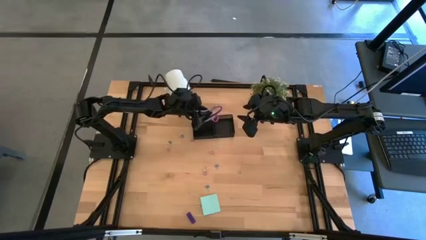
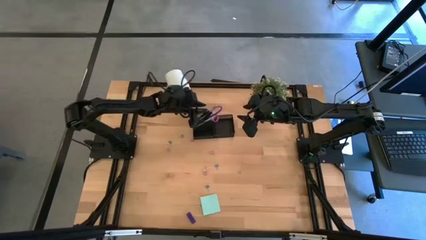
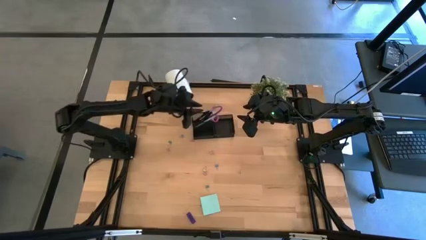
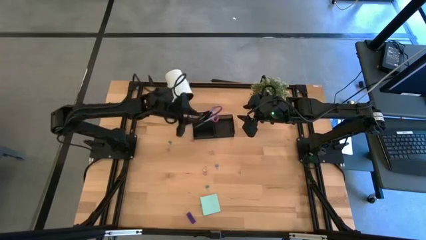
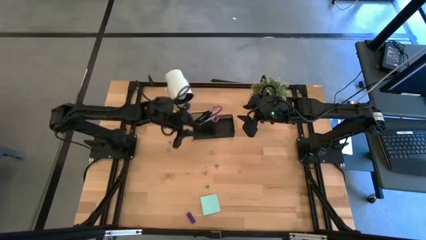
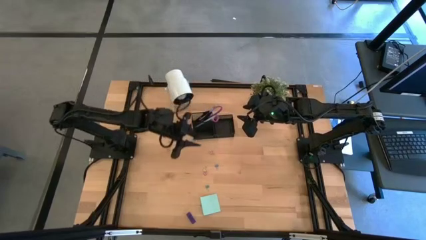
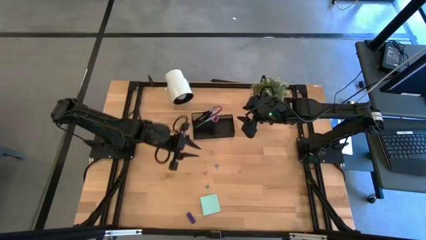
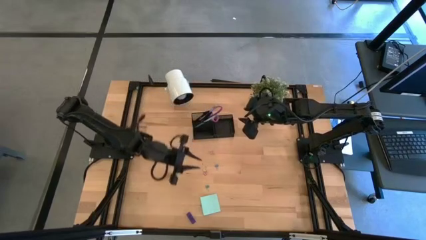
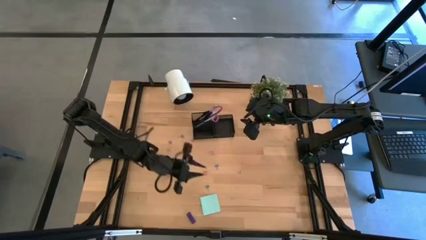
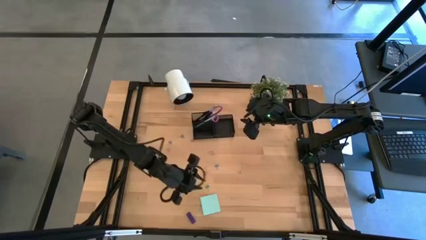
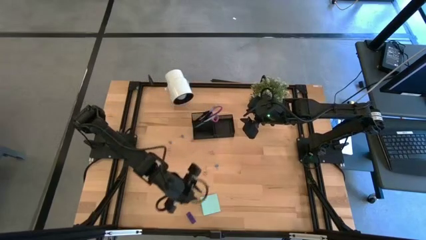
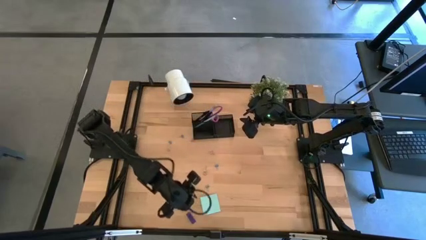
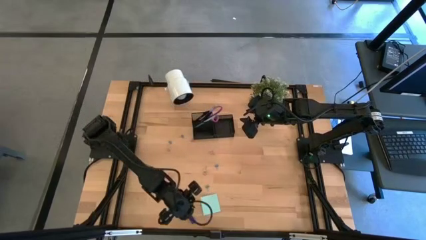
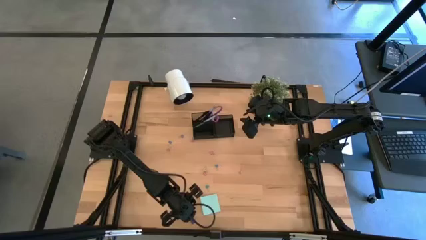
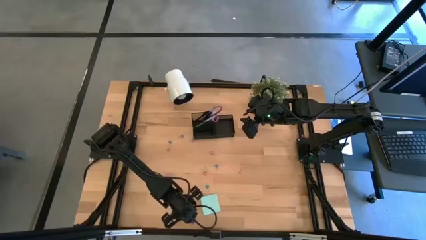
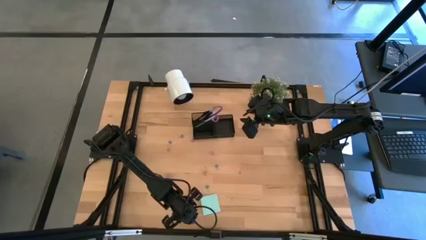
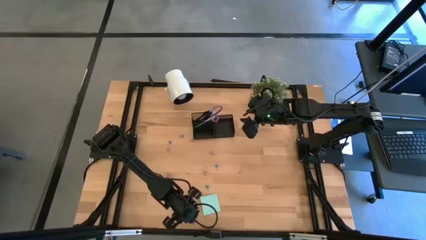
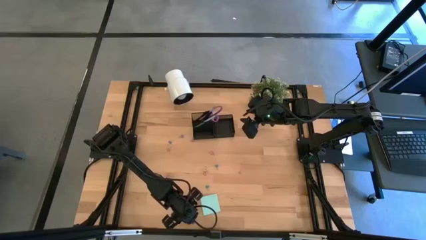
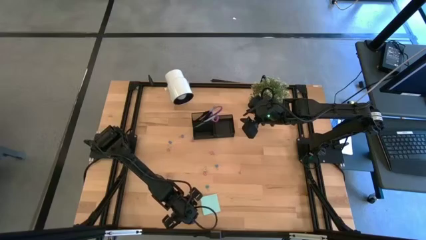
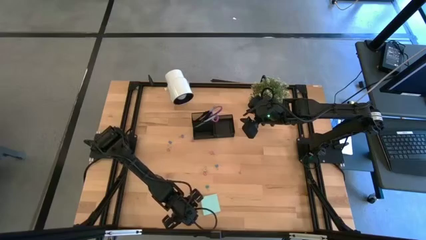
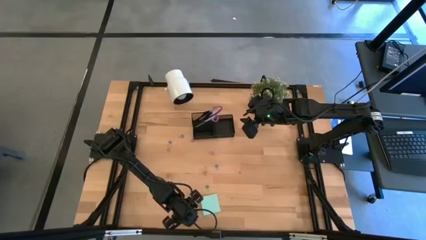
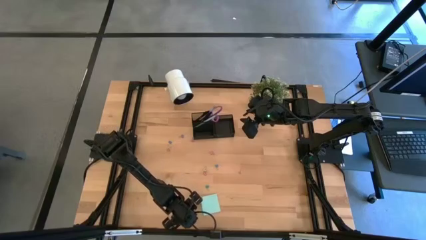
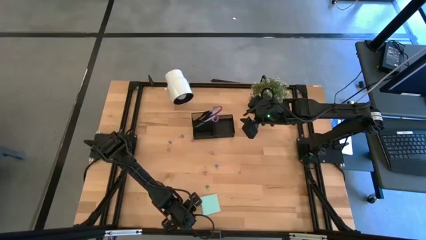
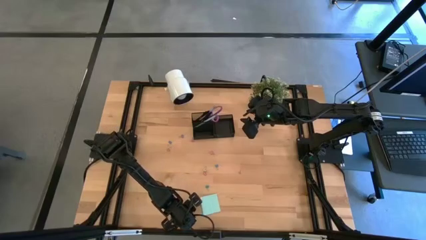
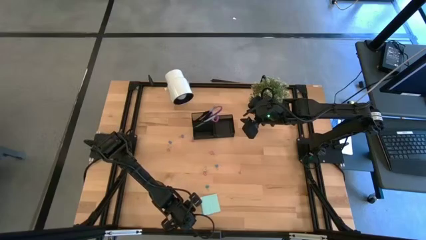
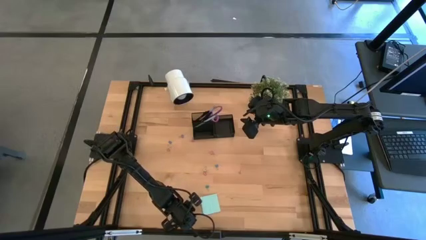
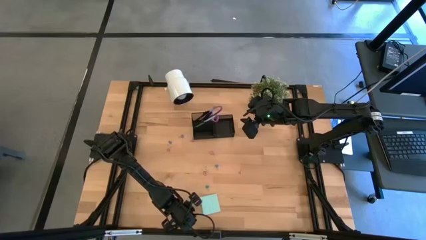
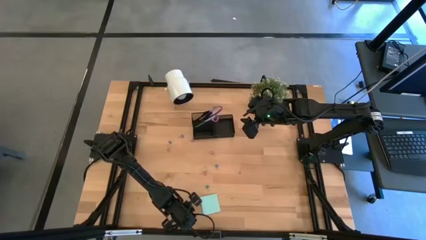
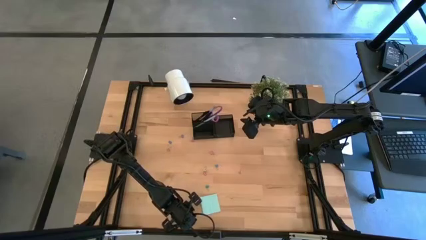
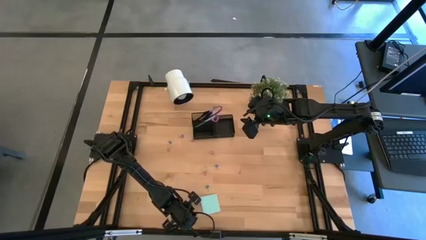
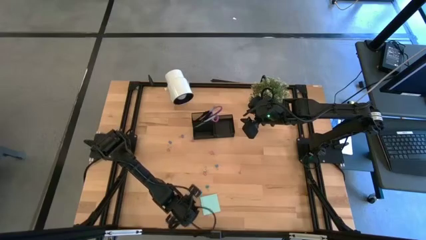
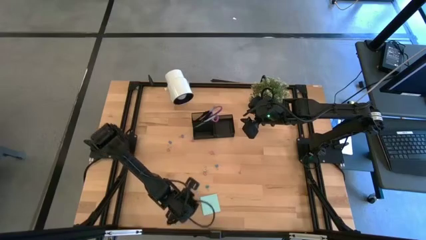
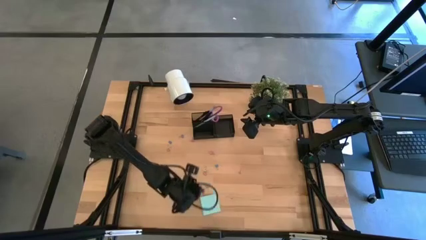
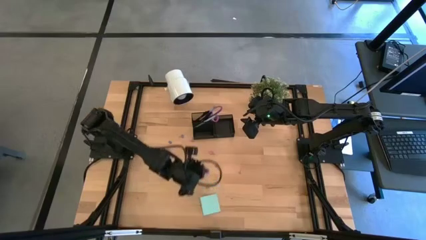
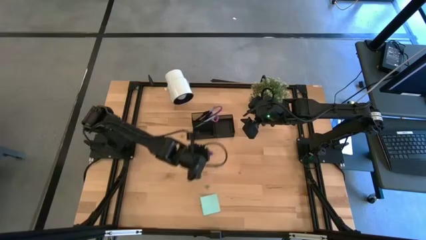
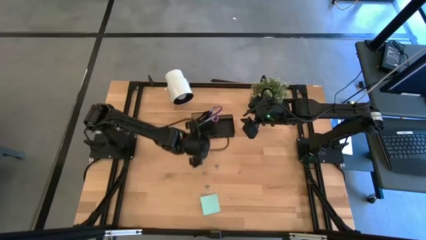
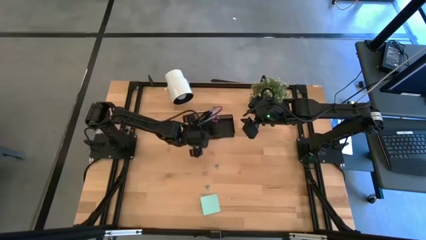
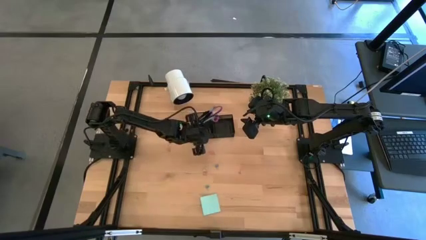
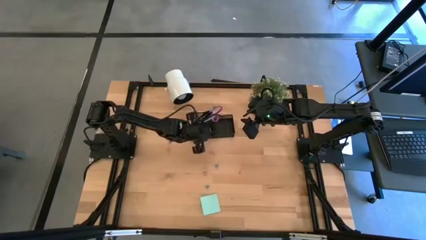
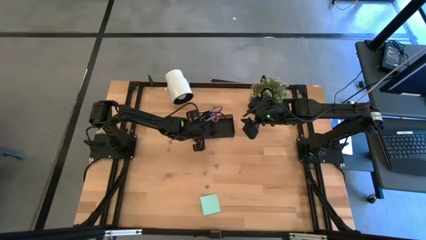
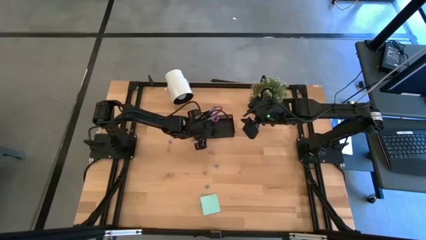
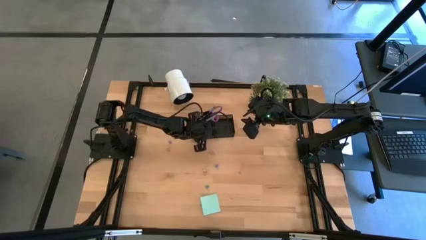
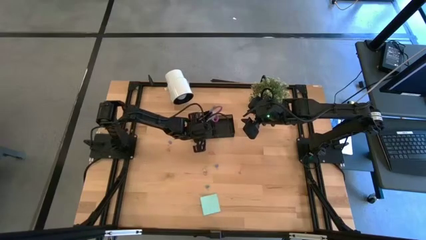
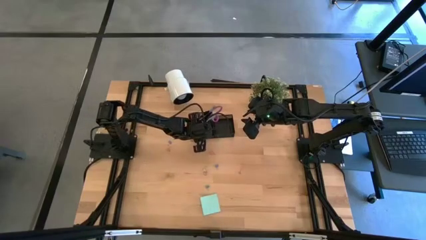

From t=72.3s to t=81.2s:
Task: Pick and place office supplies into organizer
Put the blue eraser into the black desk organizer

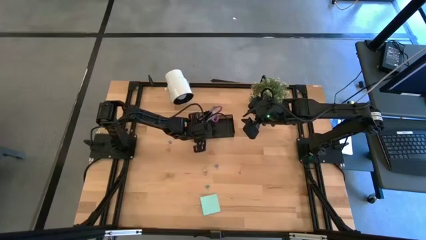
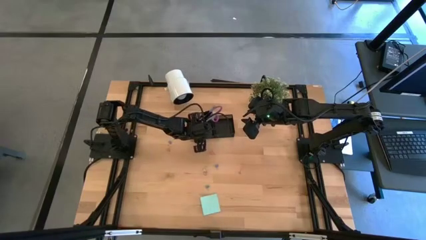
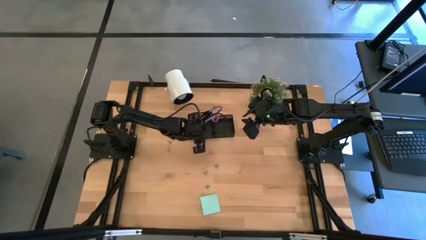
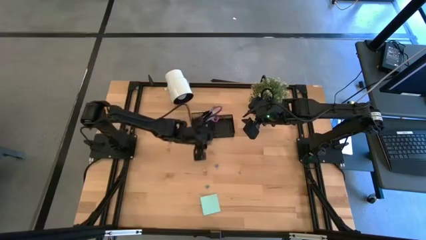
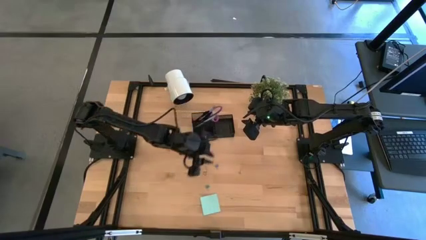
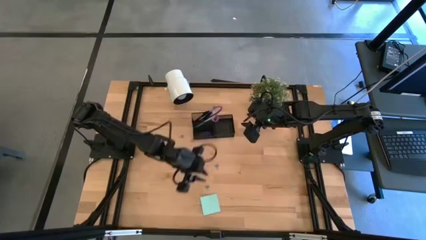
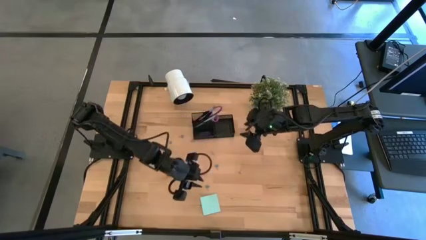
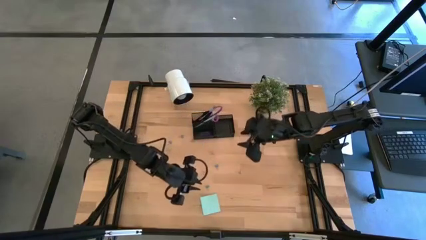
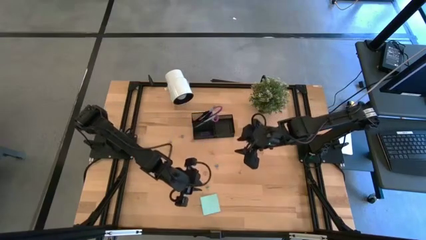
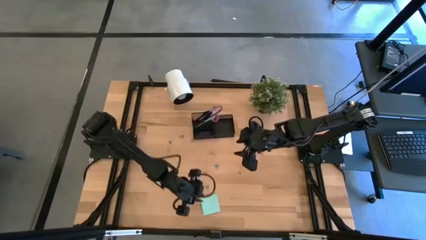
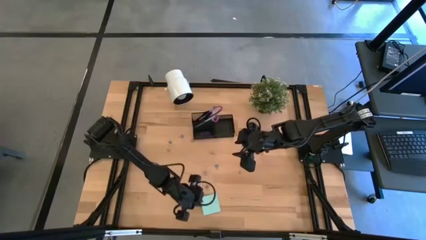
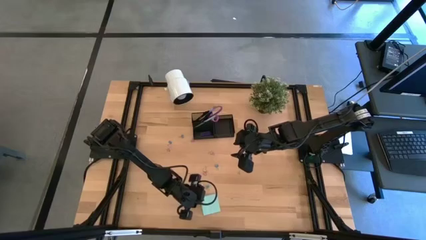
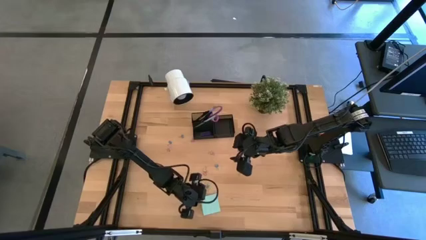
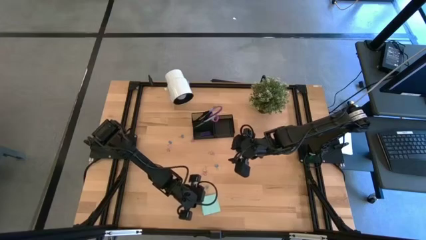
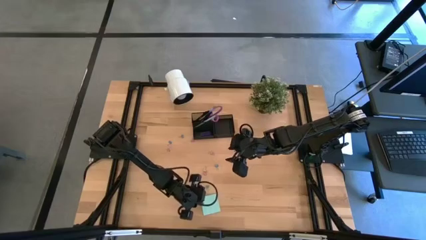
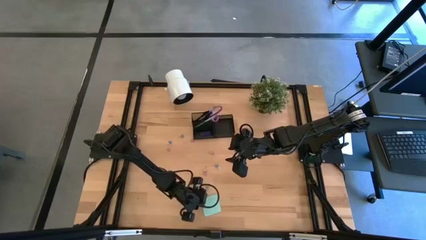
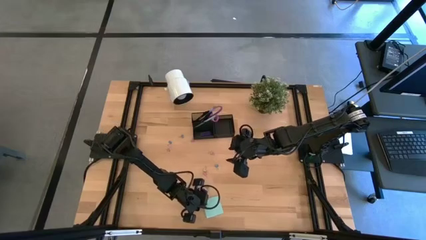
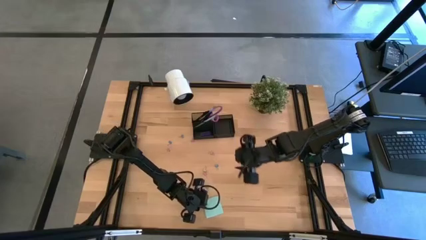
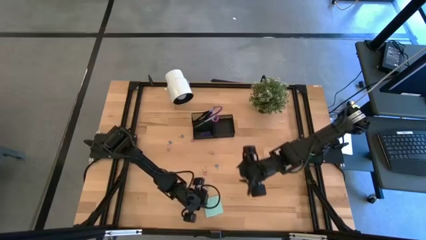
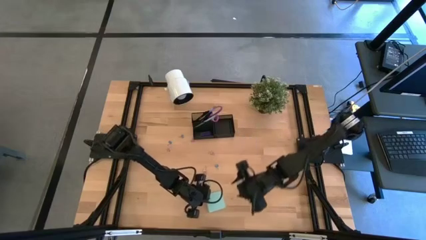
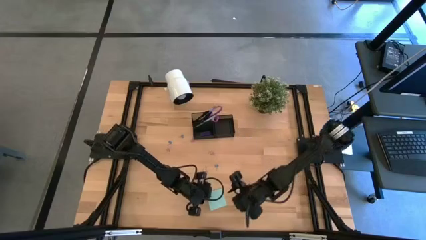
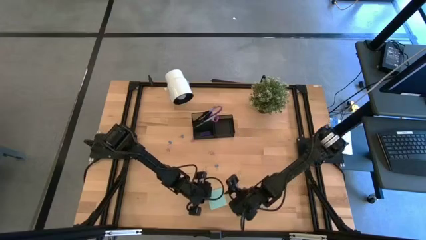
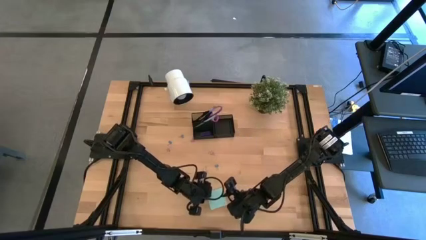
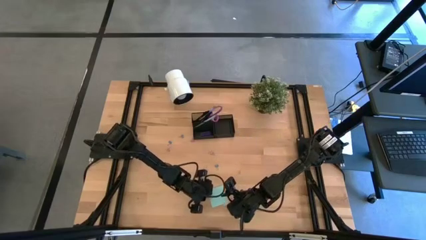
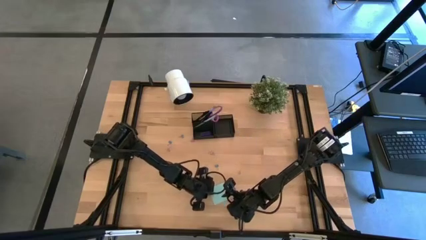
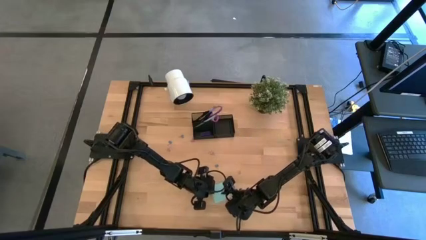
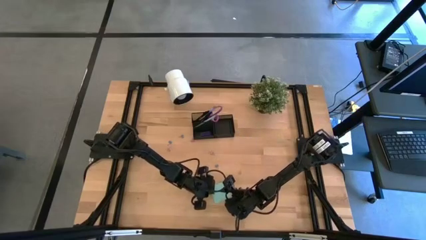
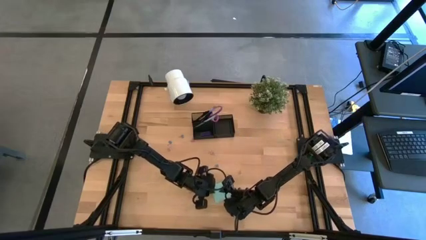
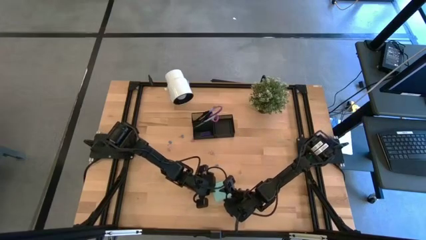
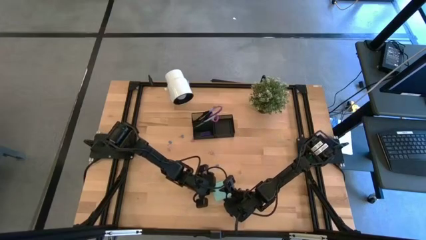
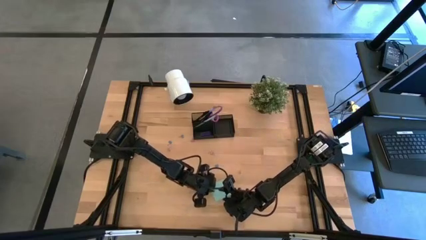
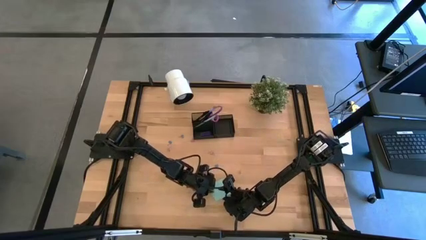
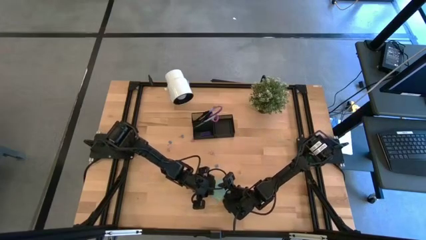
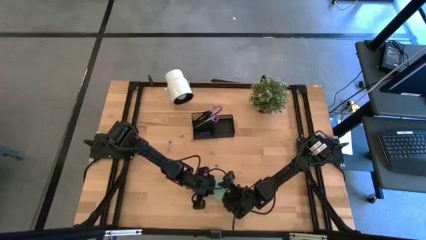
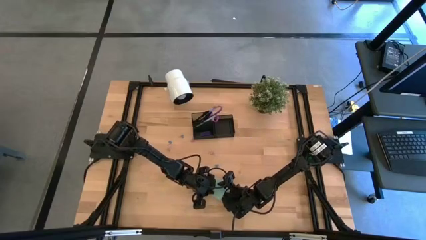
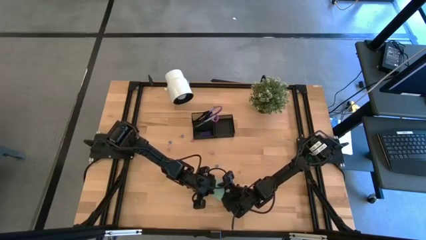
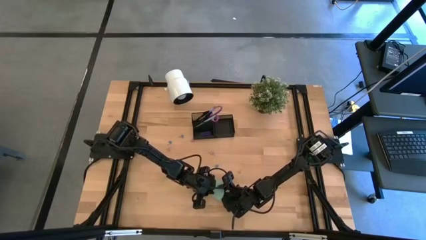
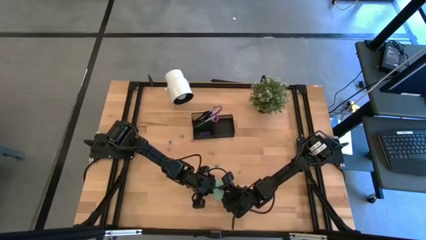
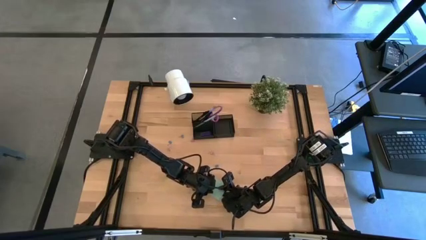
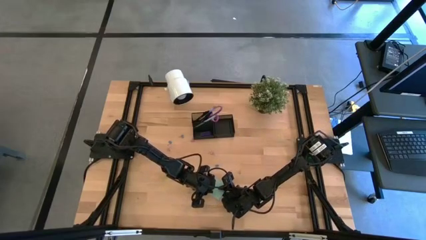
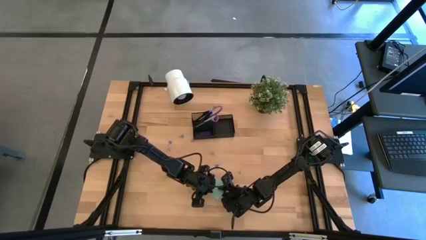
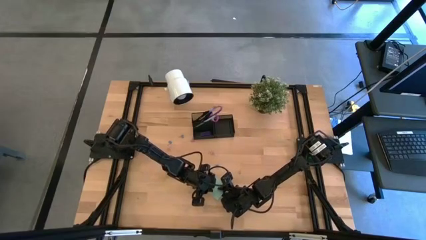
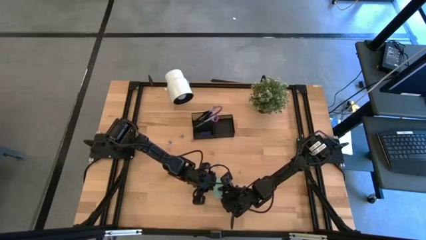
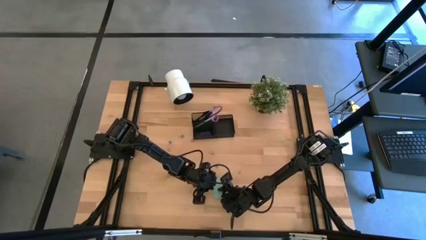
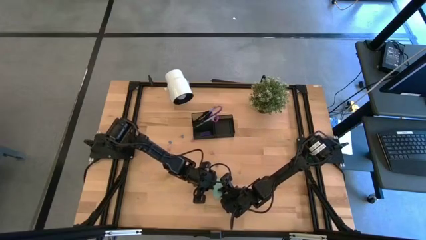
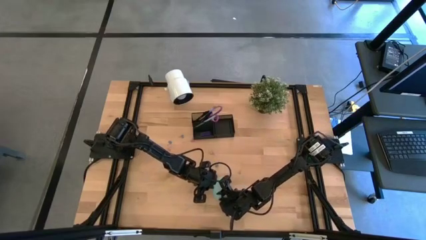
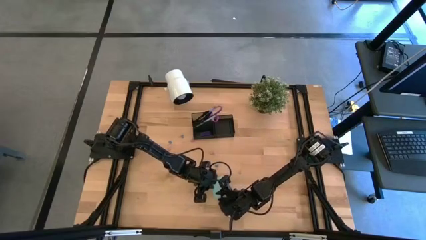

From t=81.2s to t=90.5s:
Put the sticky note pads into the black desk organizer
